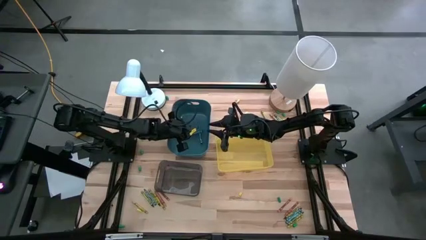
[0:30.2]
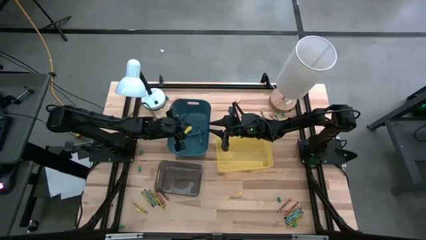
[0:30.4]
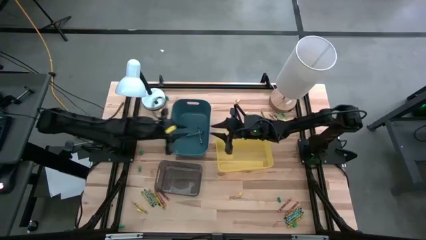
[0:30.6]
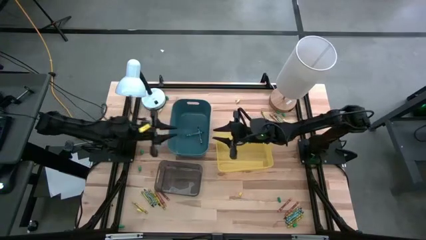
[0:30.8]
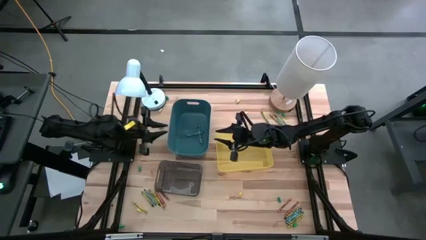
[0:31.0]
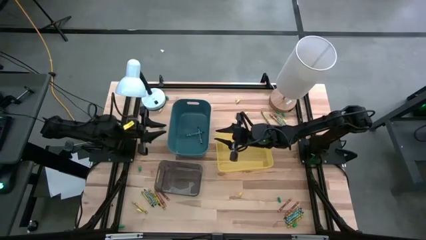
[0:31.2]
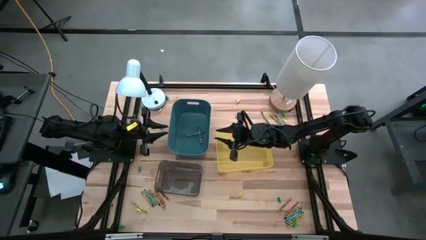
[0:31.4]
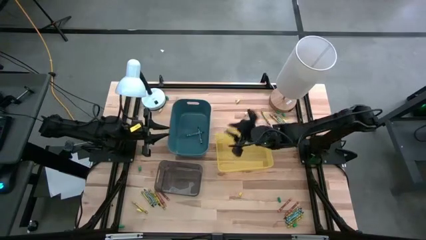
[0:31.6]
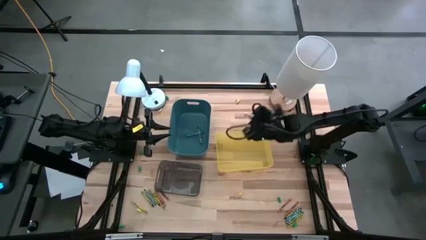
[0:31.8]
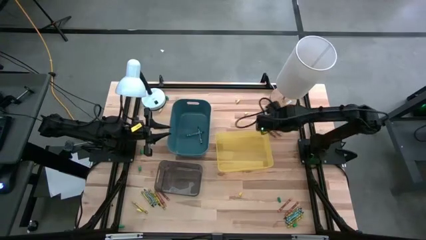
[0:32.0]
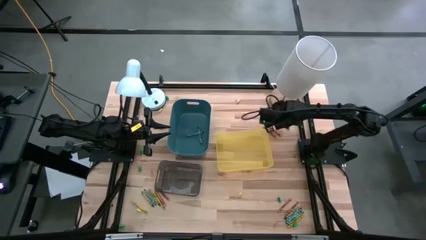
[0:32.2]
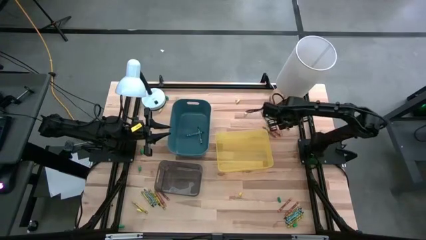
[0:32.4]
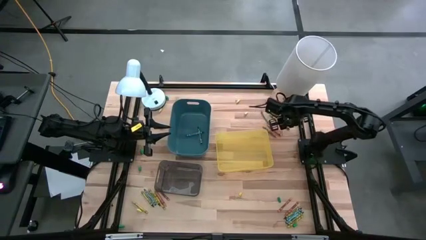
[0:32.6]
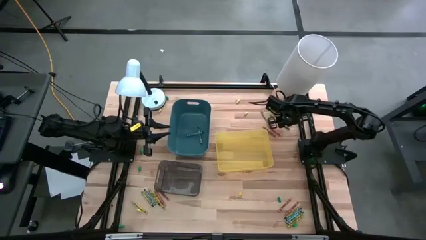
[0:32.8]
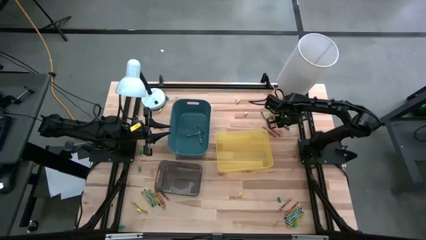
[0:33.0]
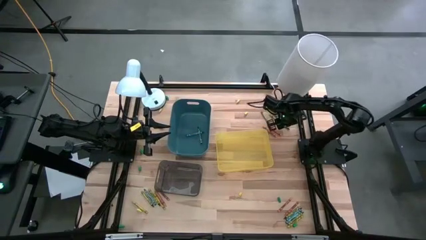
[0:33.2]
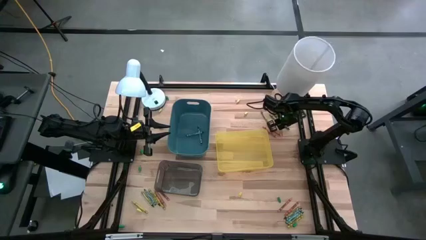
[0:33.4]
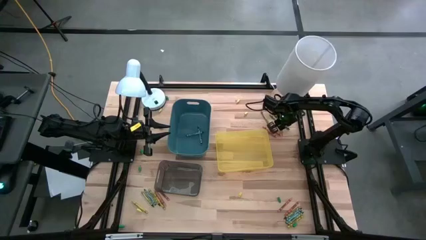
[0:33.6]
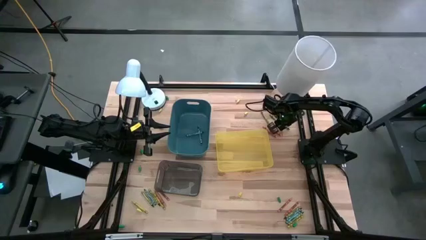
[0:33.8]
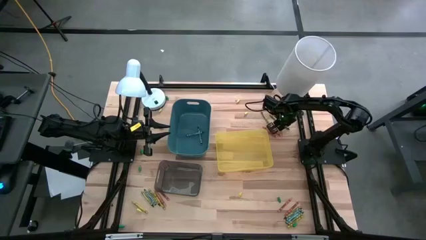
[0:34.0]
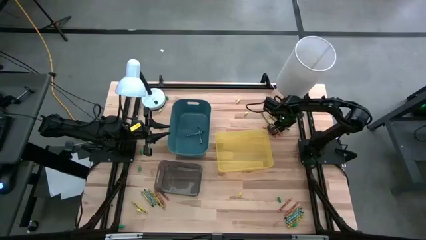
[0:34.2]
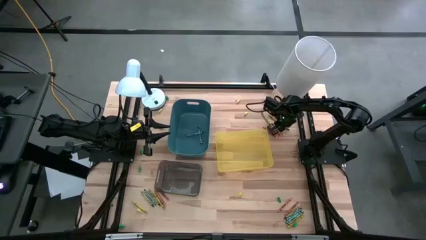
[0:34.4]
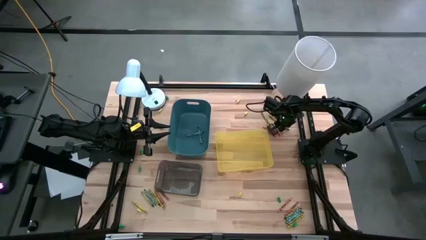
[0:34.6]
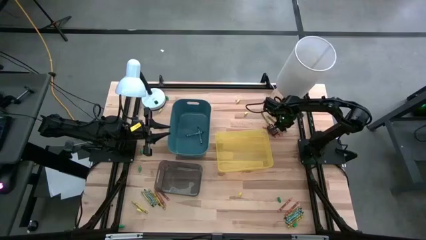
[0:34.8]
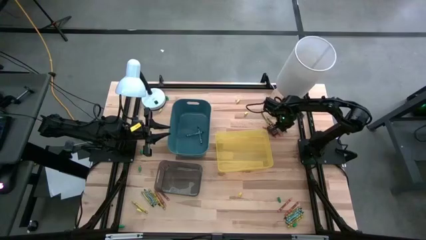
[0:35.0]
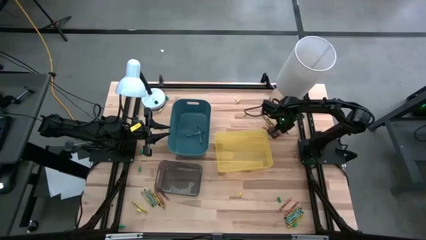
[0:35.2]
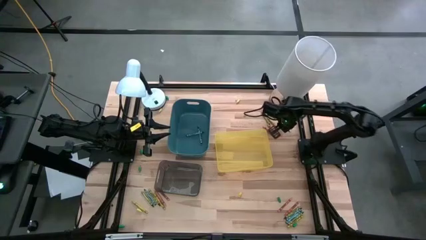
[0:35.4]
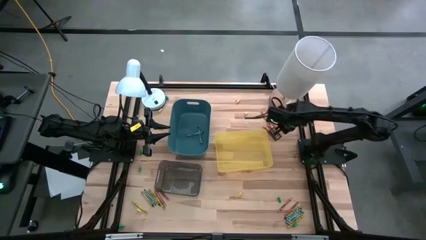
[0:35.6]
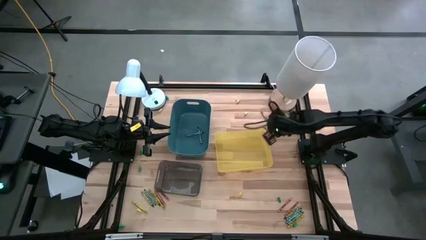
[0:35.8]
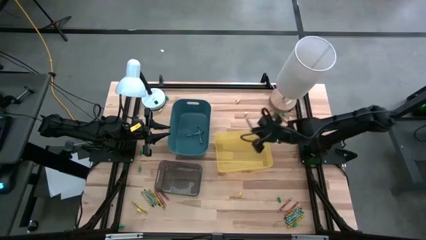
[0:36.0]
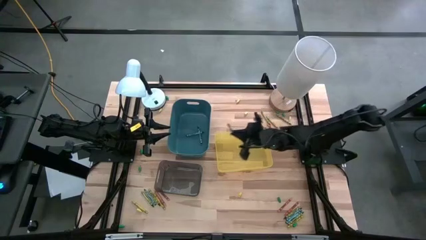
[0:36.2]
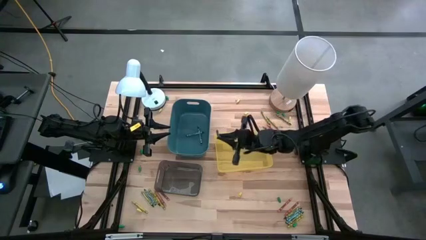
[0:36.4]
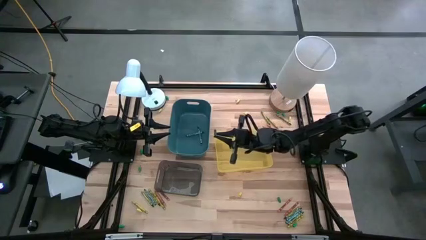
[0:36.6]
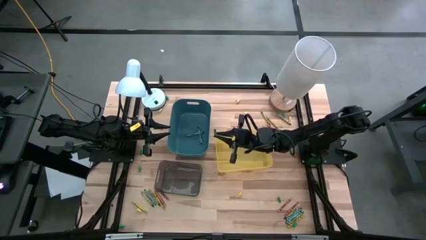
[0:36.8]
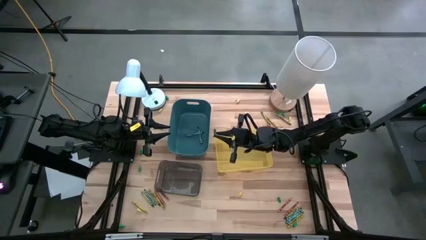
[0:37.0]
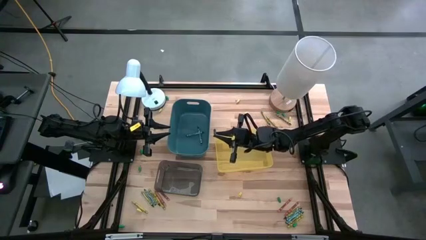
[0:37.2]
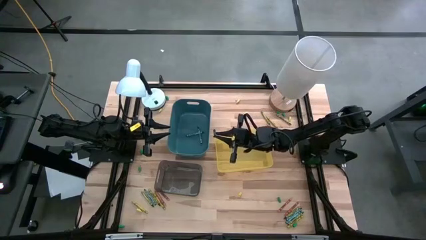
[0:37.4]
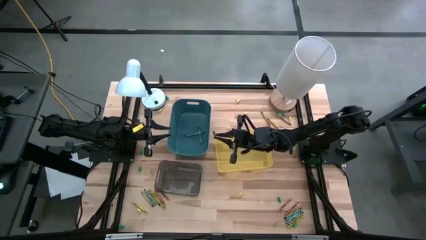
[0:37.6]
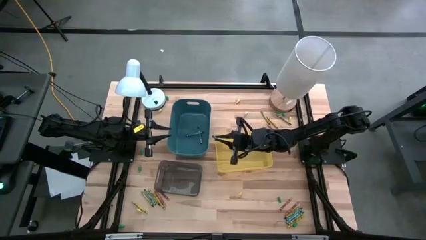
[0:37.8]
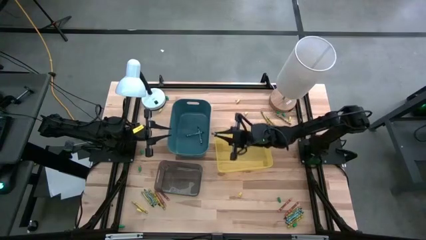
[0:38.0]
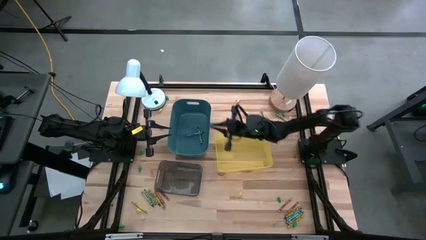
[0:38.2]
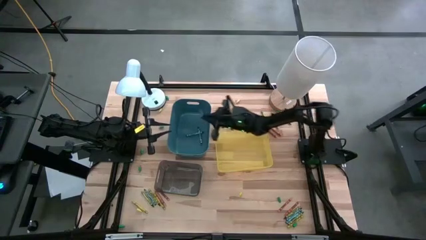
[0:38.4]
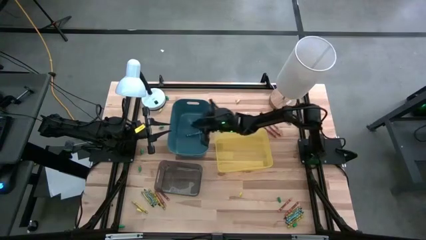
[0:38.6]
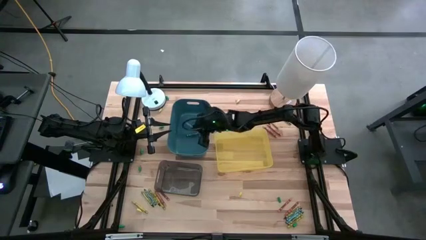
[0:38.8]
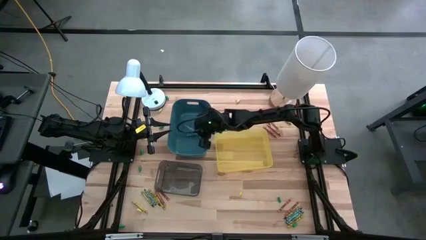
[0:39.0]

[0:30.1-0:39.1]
Task: Sort crayons
Put the blue crayon into the blue bin

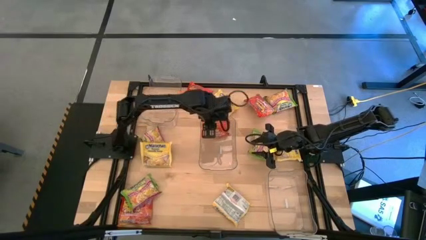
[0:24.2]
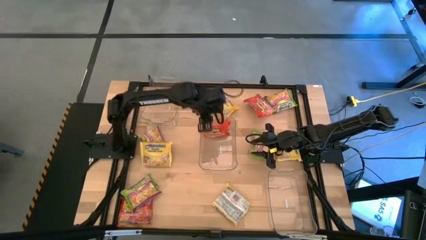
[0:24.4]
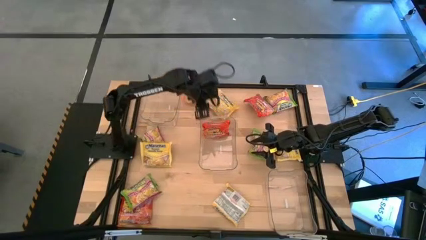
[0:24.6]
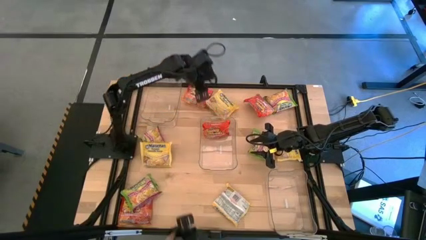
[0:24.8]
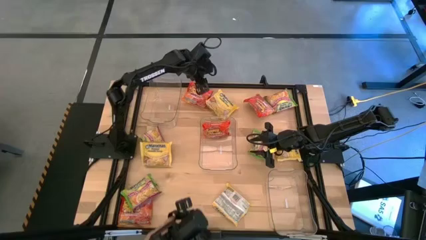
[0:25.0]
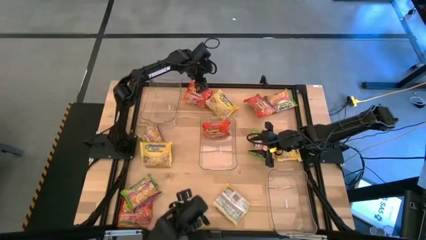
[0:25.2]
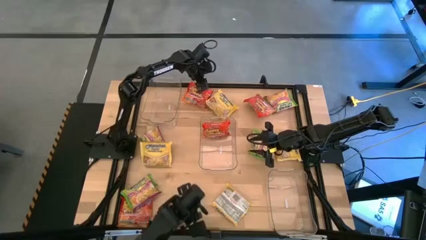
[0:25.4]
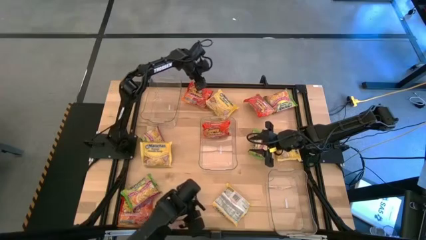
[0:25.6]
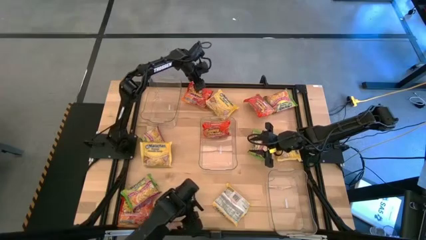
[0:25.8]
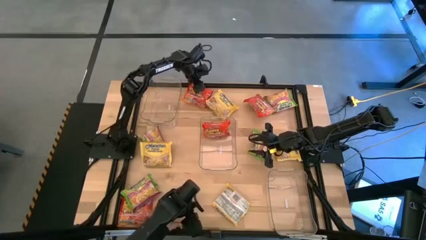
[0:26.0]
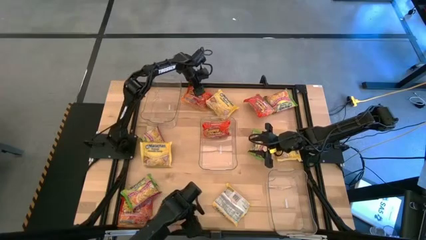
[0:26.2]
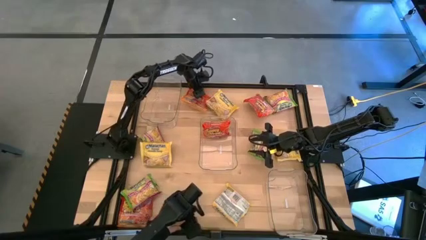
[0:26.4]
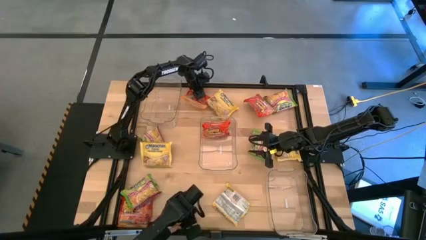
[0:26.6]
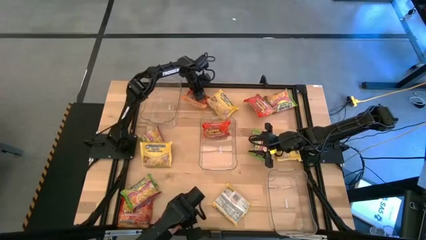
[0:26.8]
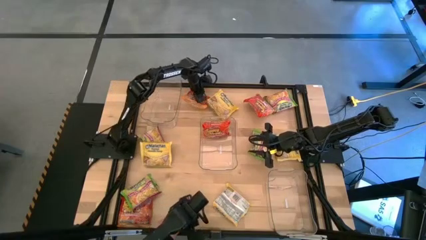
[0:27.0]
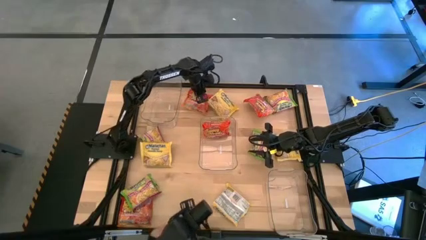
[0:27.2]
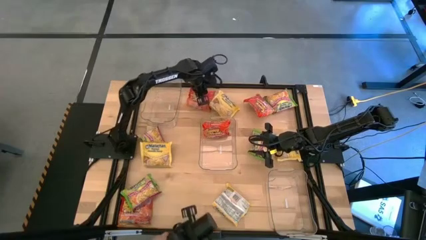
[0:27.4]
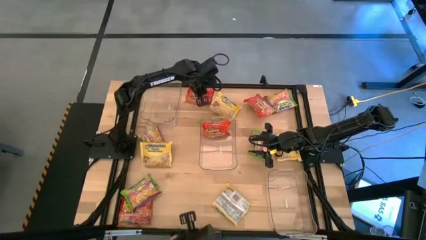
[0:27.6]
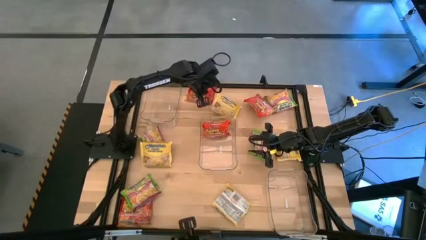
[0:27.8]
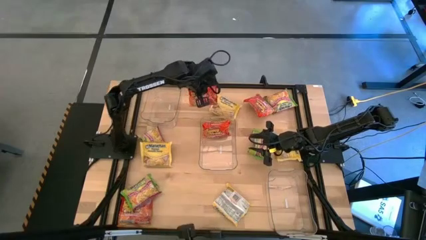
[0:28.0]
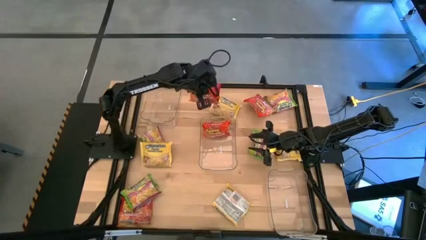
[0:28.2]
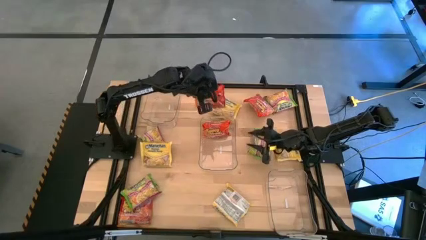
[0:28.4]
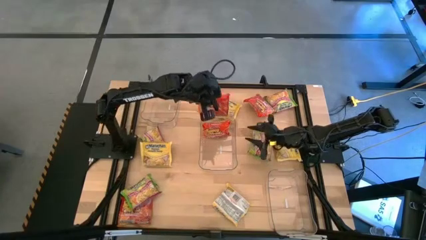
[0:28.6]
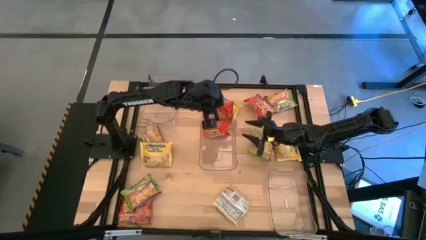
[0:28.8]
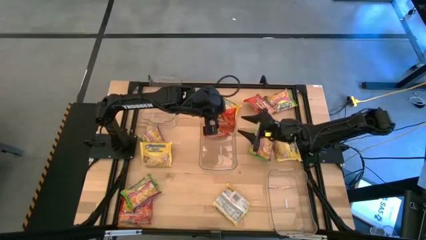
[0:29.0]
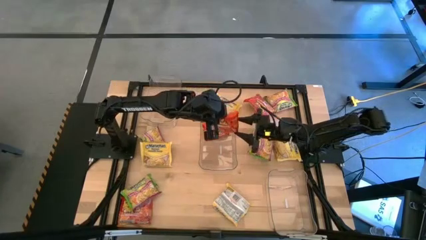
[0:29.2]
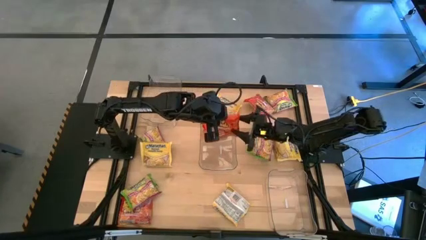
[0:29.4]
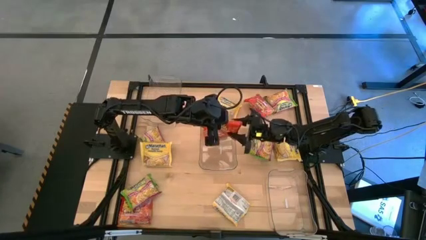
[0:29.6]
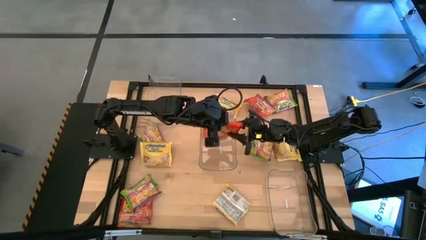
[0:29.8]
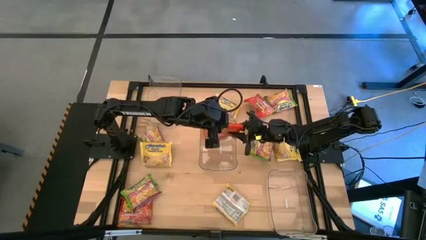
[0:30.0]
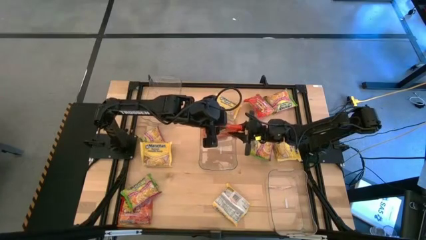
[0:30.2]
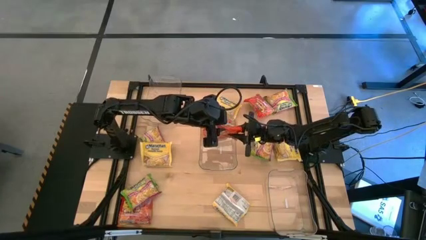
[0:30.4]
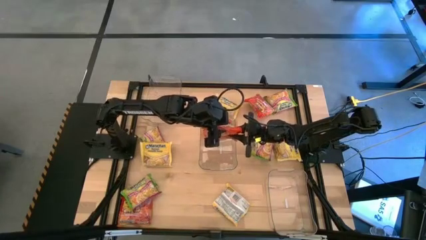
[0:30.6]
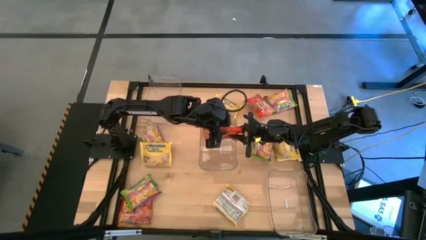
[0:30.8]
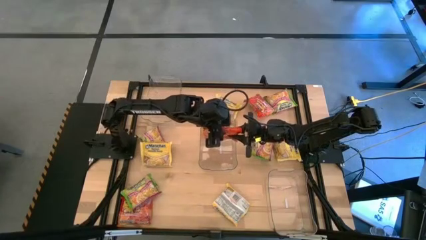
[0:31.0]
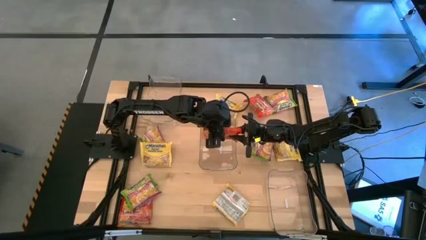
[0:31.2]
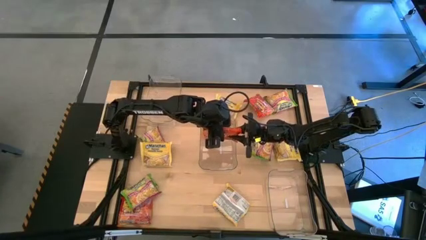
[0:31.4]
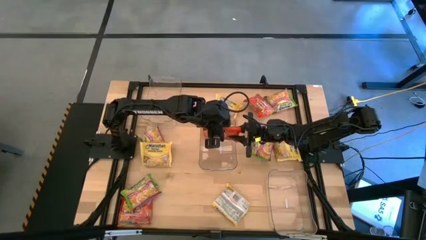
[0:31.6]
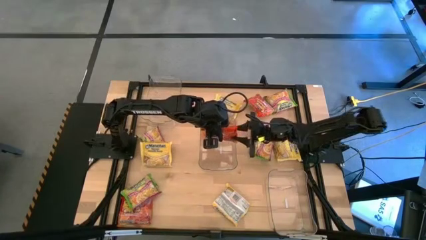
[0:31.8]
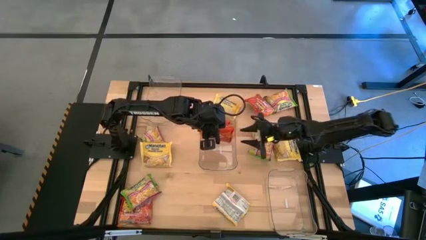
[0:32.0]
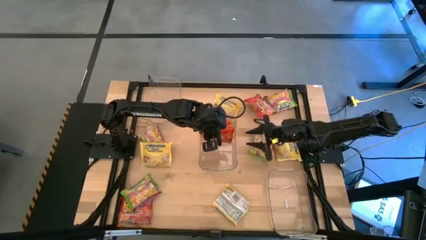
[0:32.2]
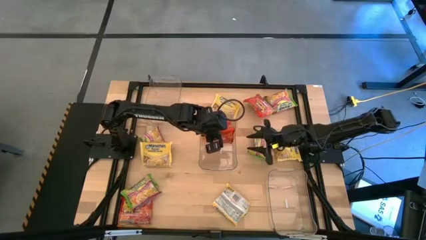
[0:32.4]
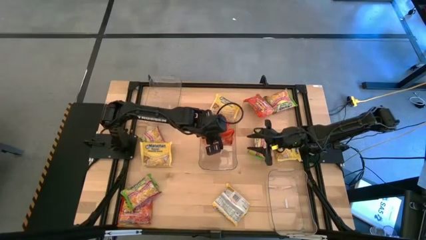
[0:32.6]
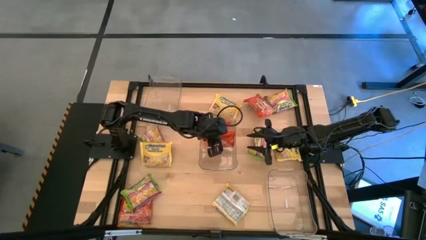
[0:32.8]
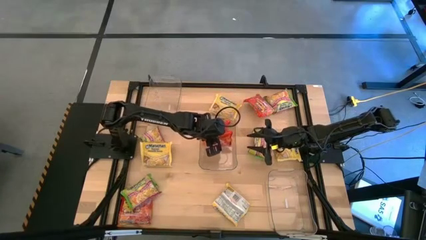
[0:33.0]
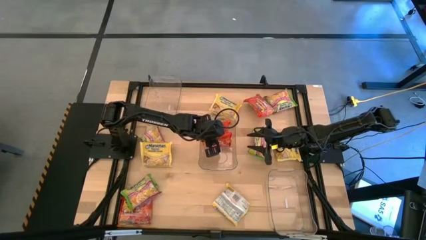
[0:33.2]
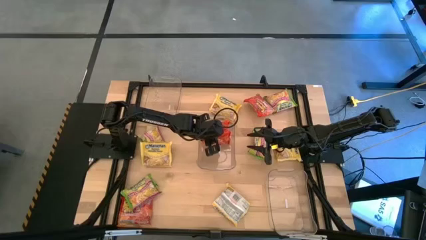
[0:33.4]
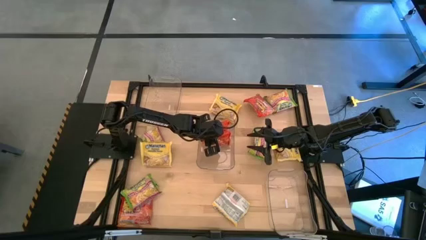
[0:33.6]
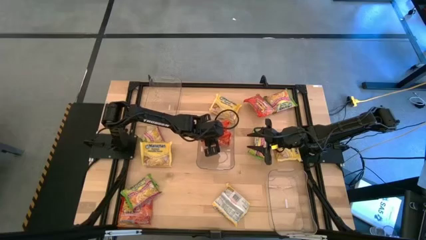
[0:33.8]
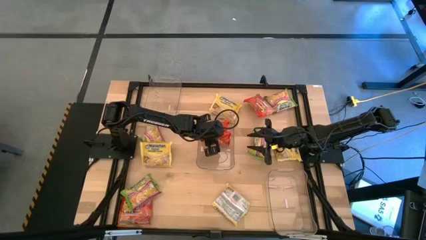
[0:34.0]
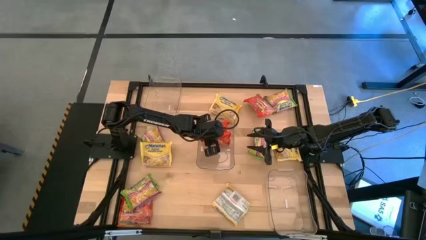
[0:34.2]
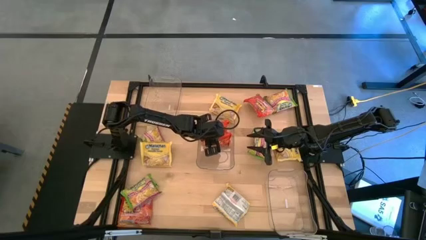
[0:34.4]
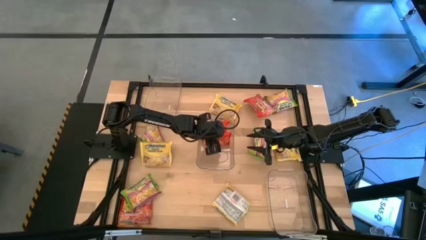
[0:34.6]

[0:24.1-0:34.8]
Task: Sort Maruchan noodles
Put the top left orange noodle pack into the middle transparent bin
